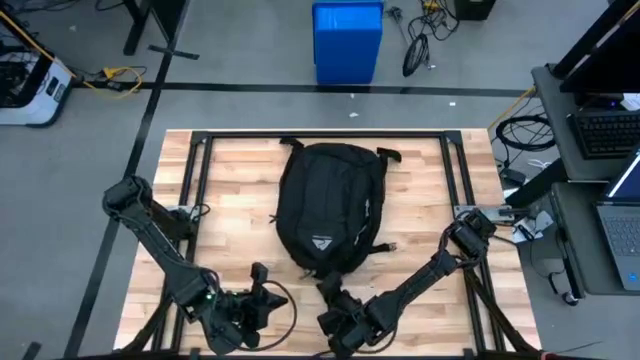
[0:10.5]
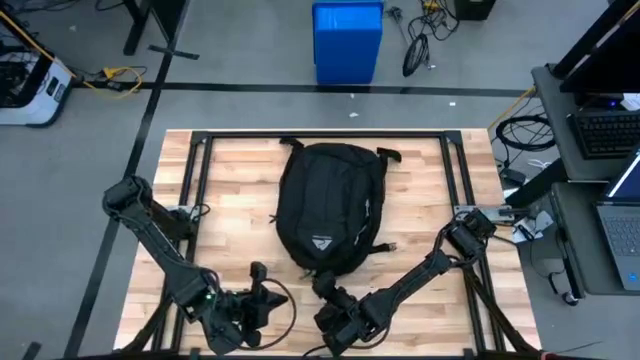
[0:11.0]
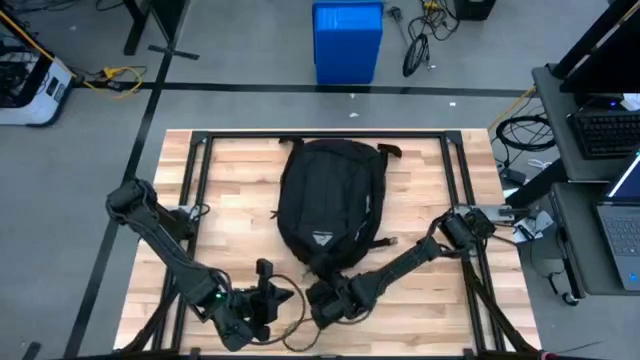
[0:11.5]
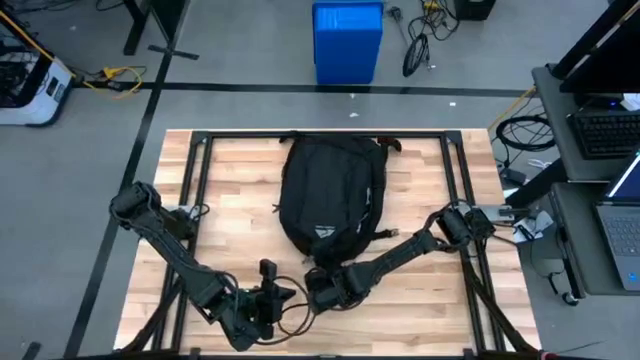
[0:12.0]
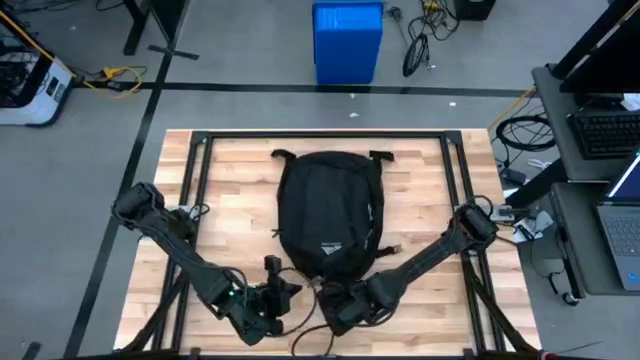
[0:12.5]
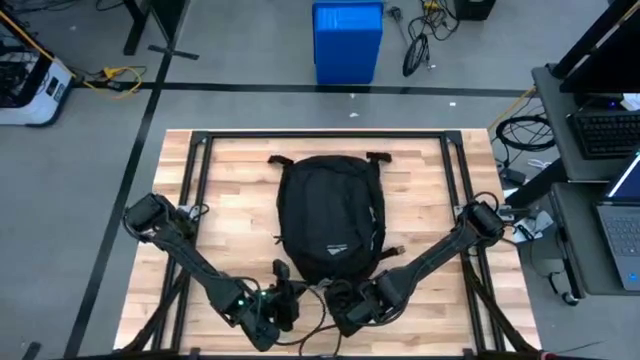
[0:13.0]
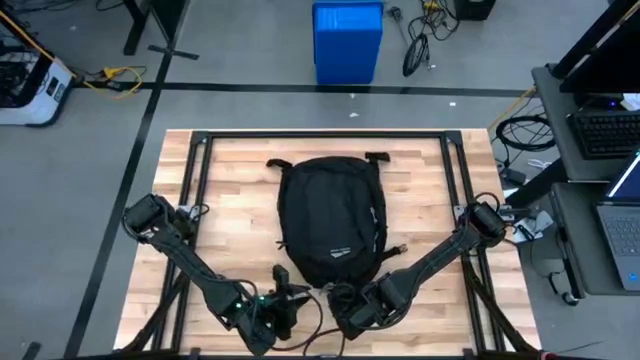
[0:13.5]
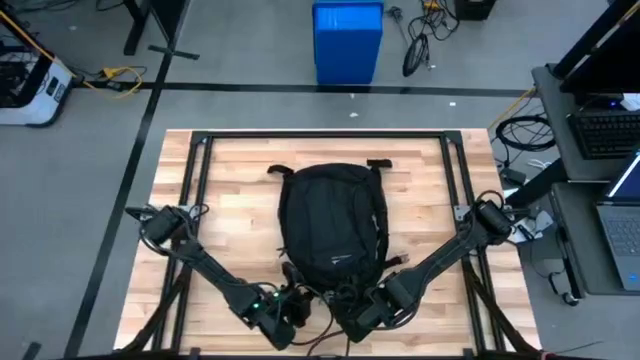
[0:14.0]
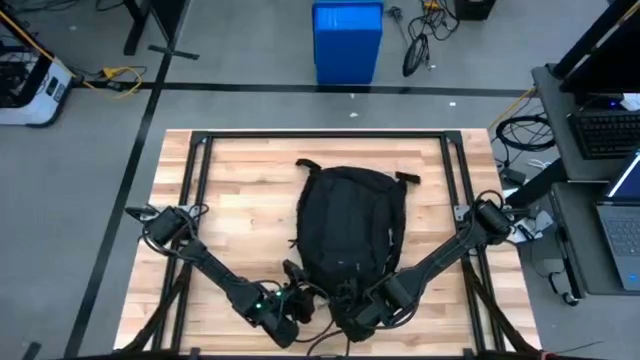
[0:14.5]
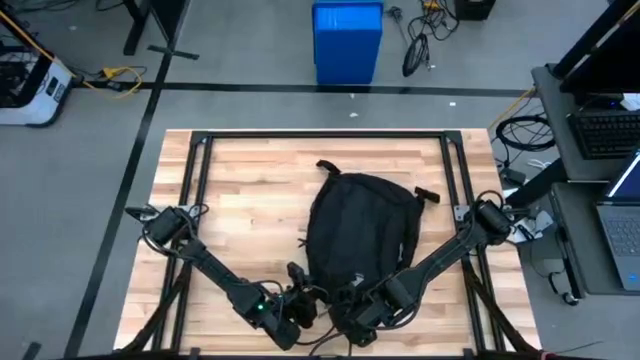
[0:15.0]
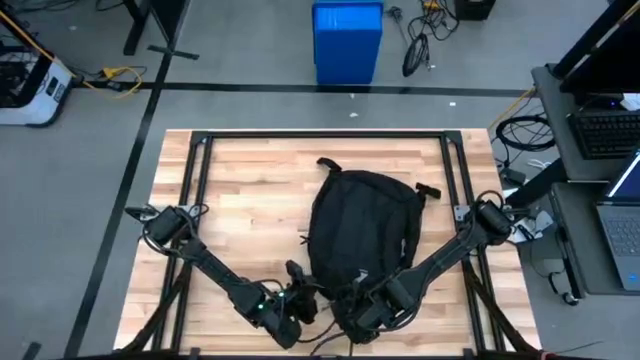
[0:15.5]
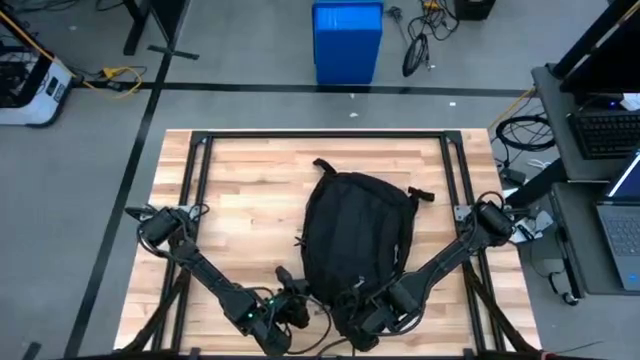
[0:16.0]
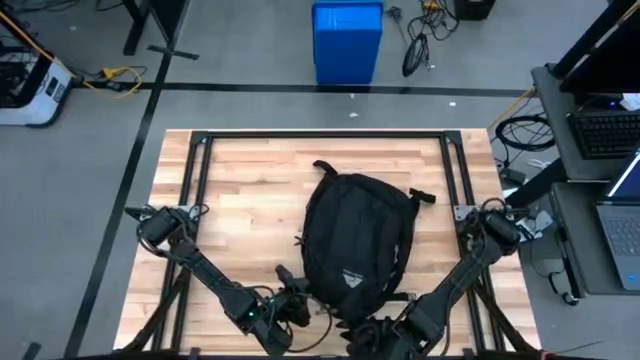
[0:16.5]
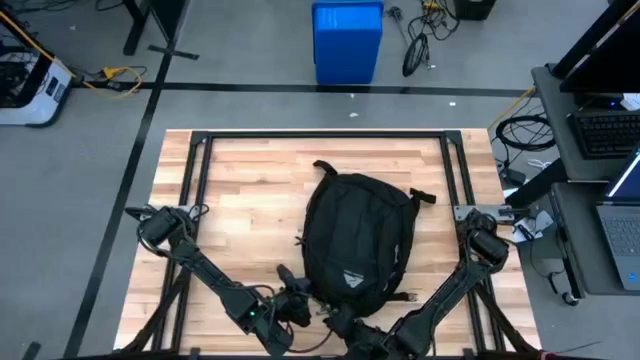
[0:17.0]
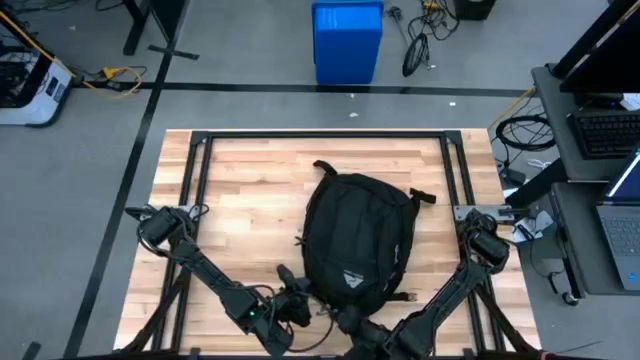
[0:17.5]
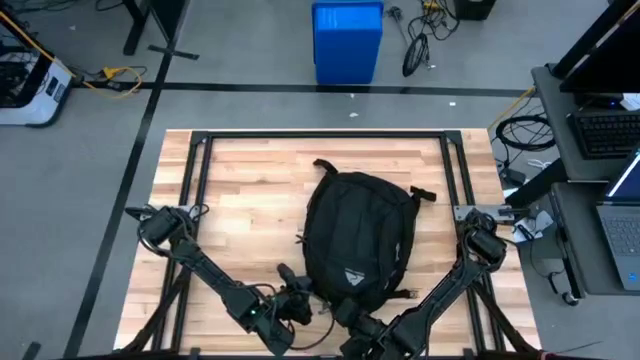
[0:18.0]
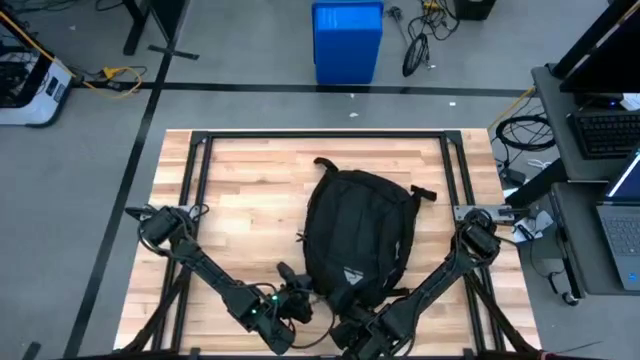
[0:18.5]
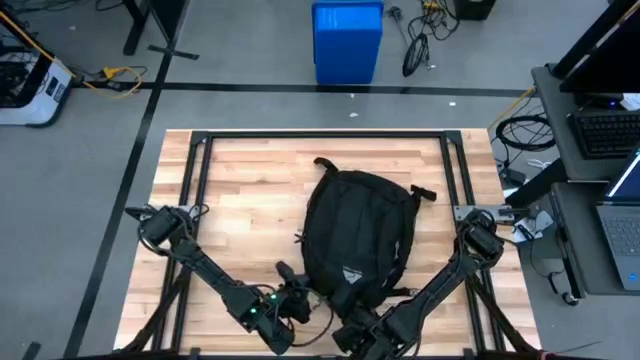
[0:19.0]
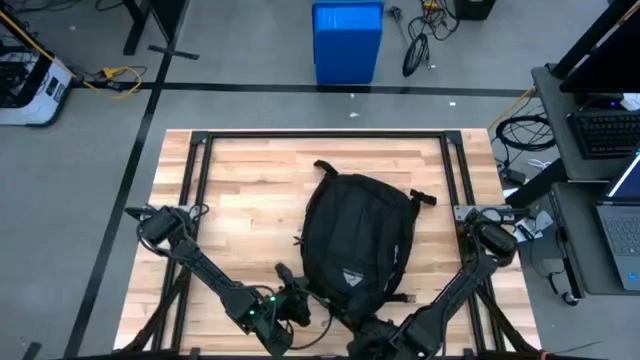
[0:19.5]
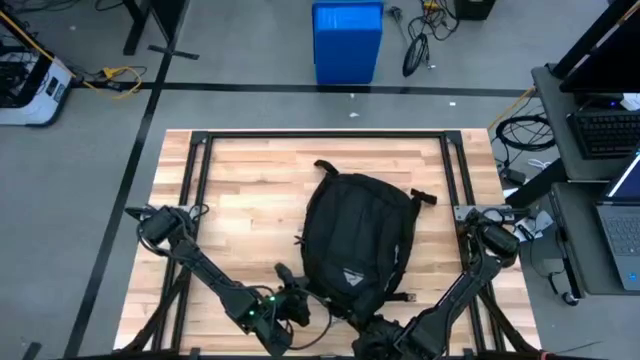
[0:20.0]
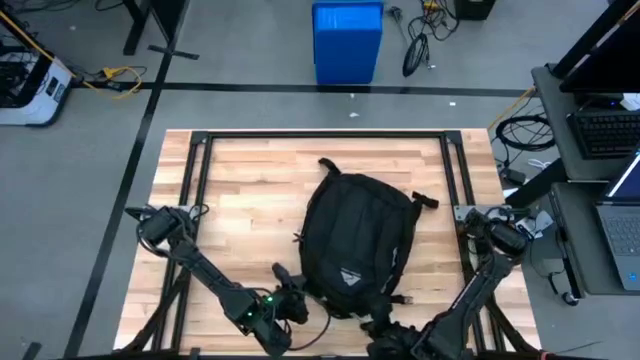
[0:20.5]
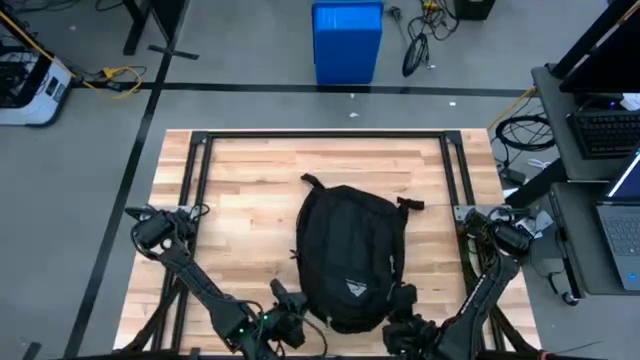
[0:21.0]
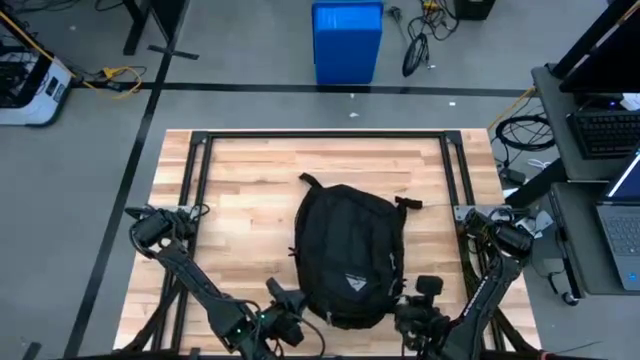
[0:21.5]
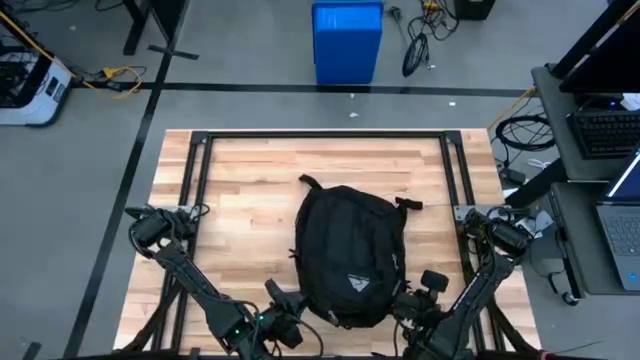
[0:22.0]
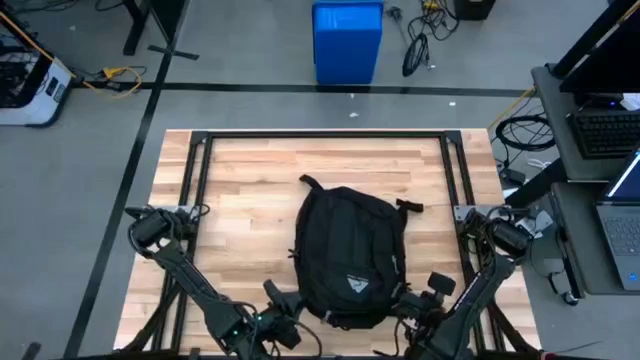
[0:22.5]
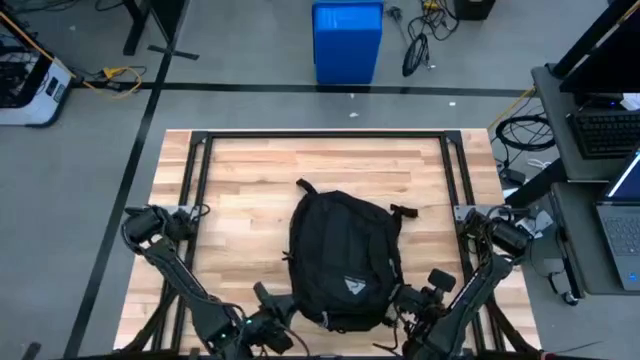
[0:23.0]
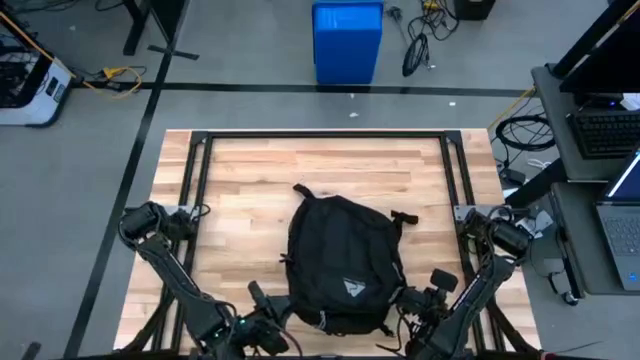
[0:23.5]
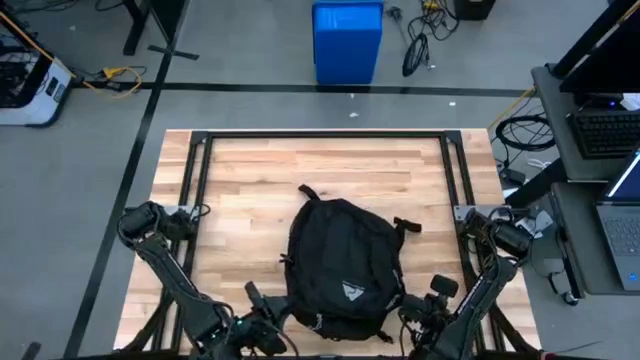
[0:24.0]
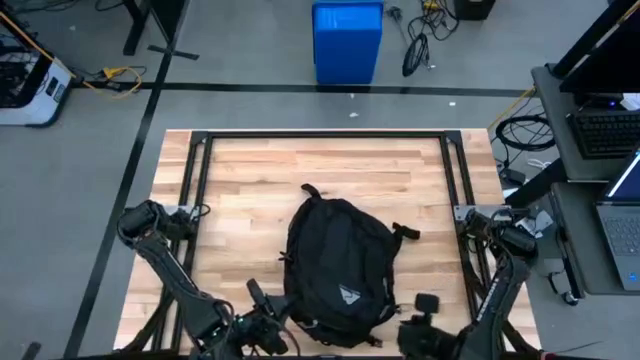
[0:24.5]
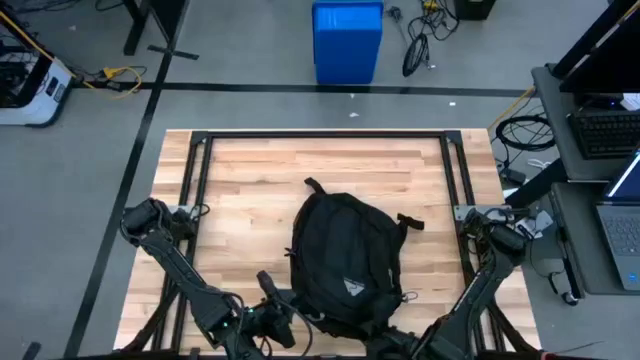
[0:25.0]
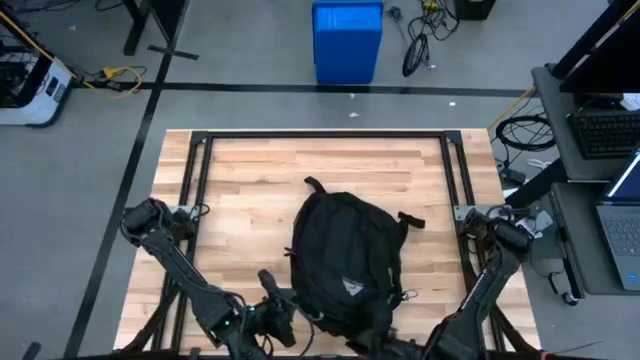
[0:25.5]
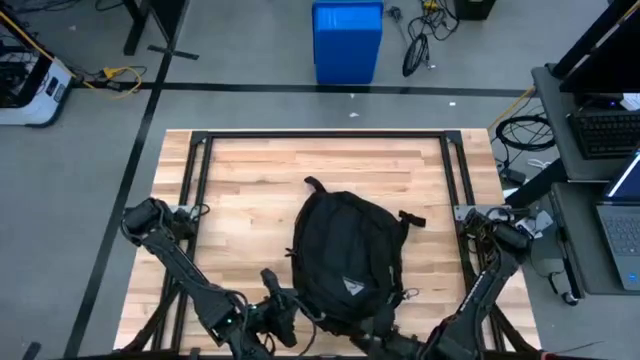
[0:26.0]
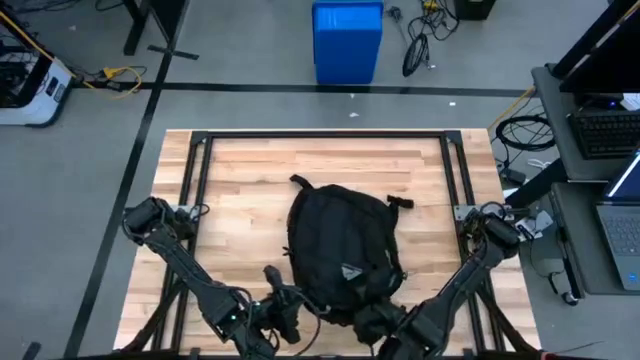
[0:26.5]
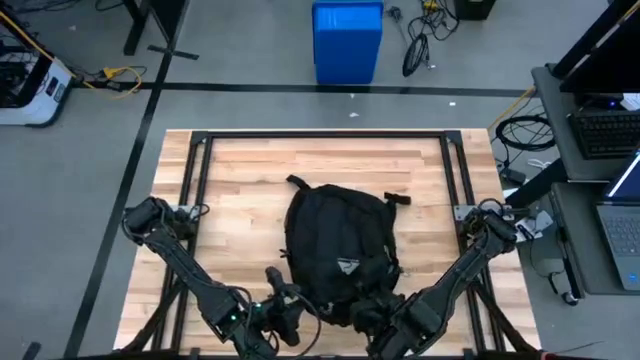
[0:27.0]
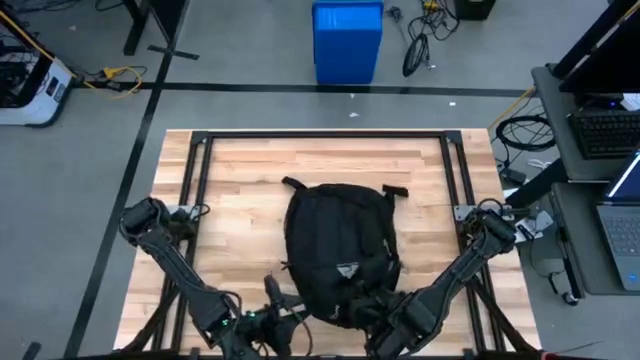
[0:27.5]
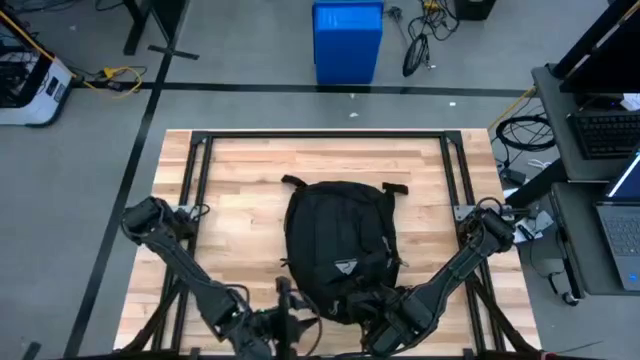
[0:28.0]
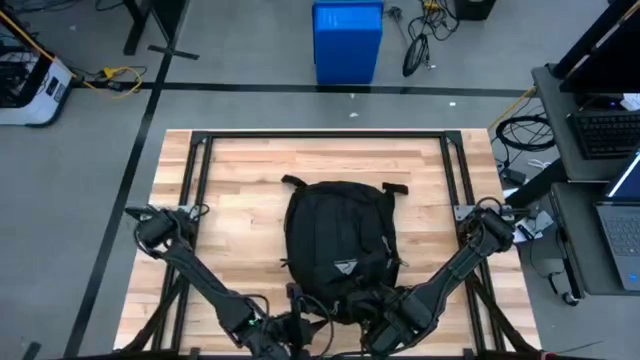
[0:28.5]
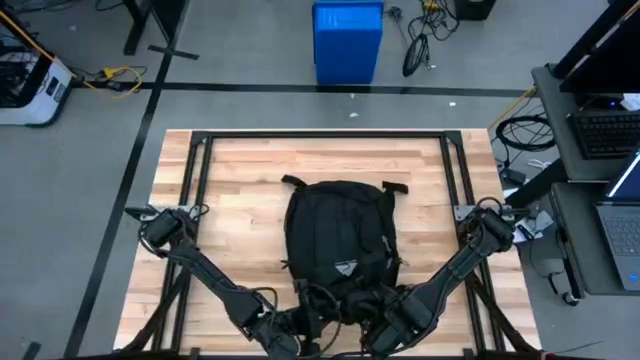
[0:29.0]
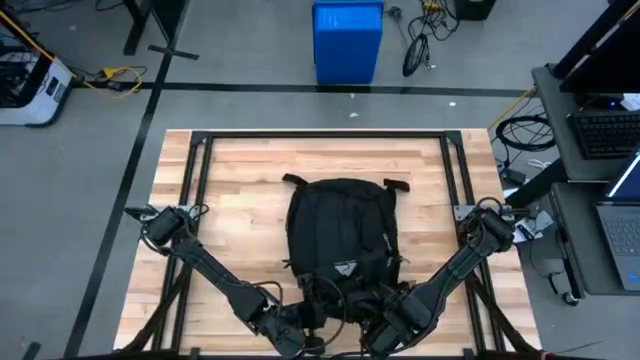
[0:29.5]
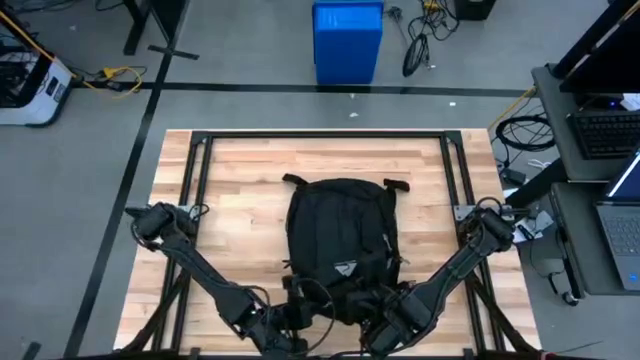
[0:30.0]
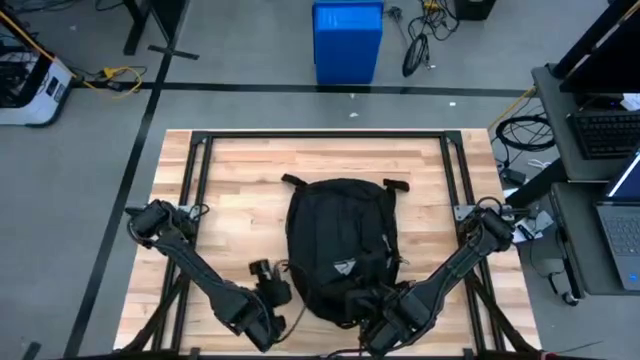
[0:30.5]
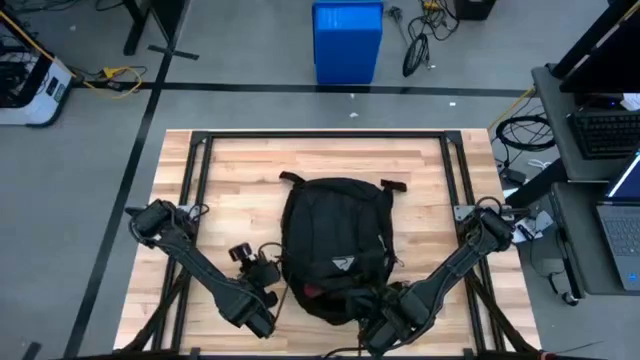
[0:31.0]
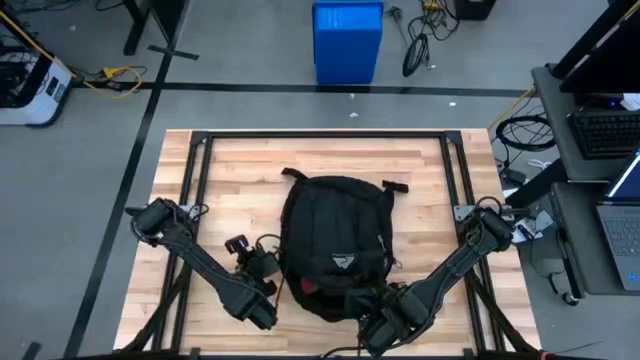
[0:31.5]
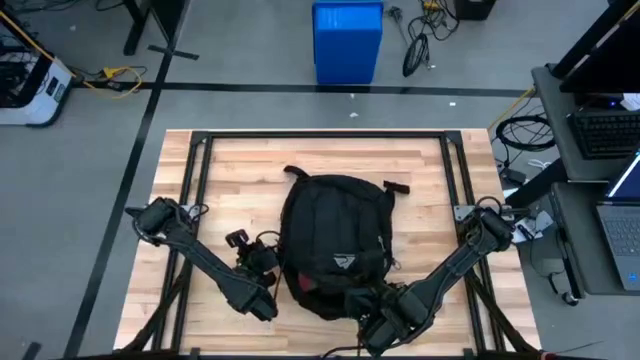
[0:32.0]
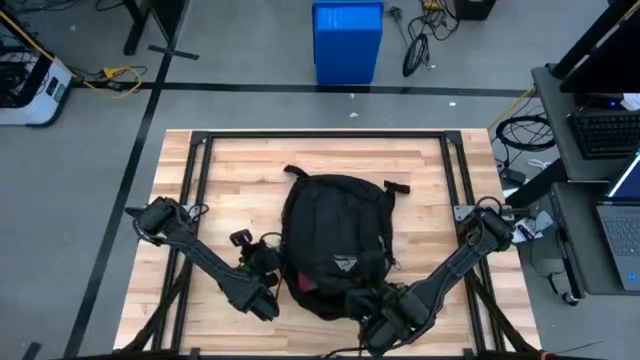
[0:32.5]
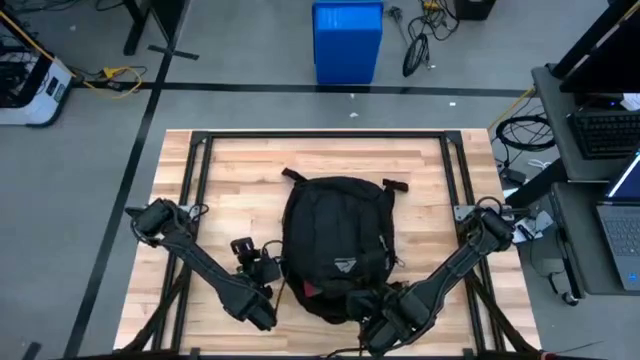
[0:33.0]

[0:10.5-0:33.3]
Task: Unpack backpack
Open the black backpack
